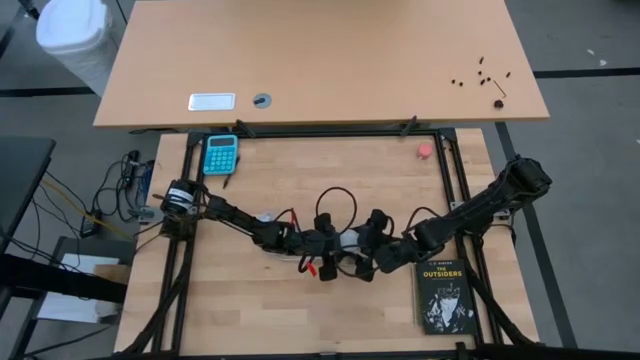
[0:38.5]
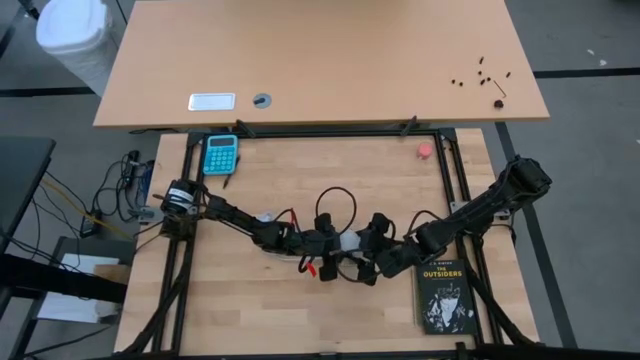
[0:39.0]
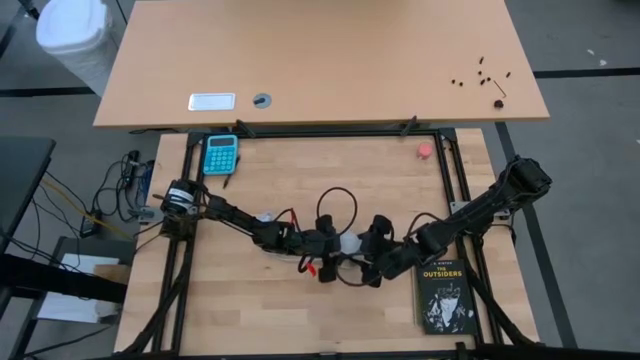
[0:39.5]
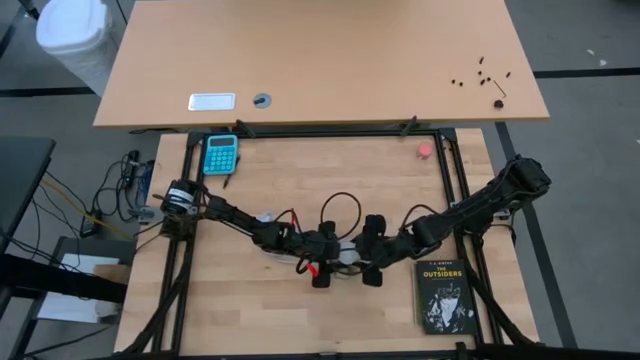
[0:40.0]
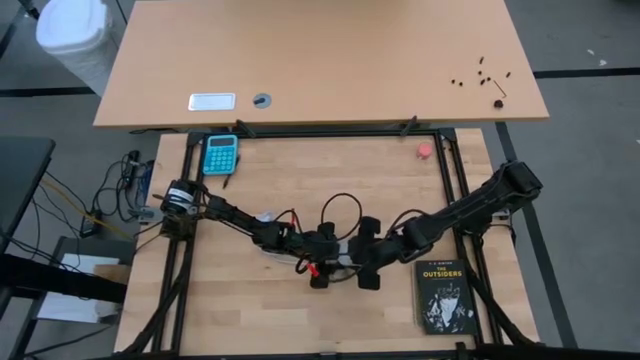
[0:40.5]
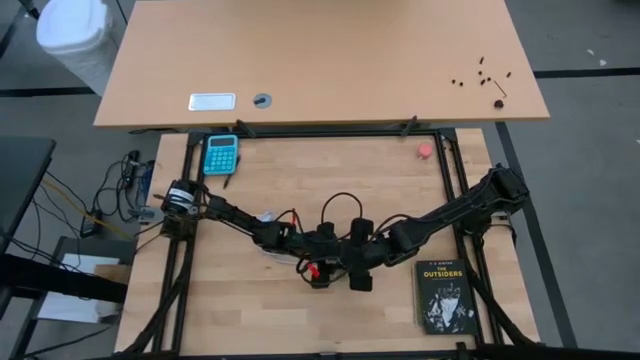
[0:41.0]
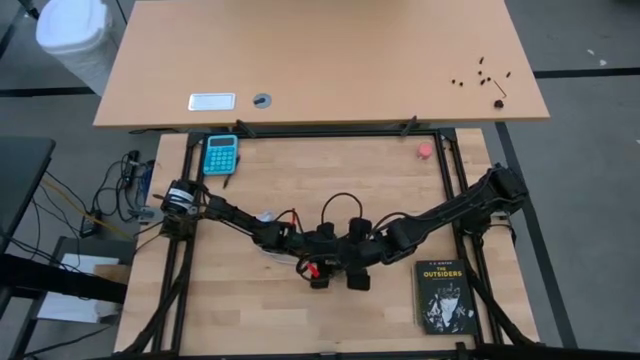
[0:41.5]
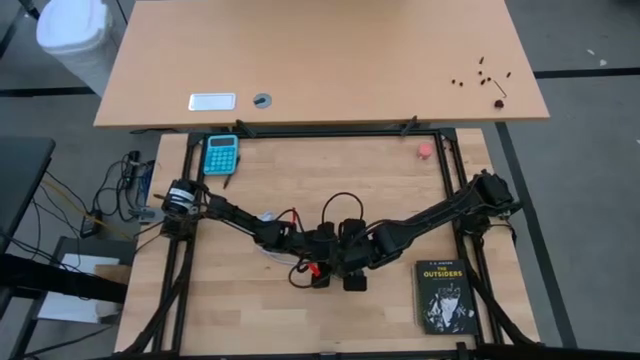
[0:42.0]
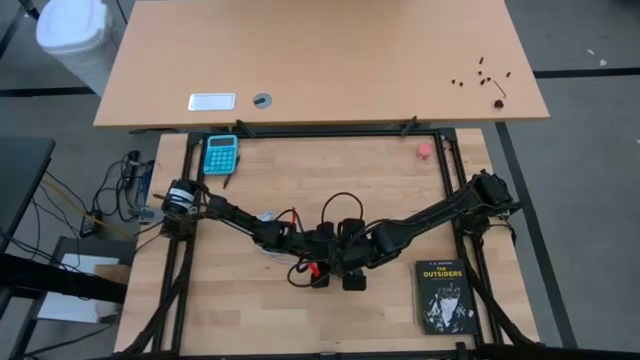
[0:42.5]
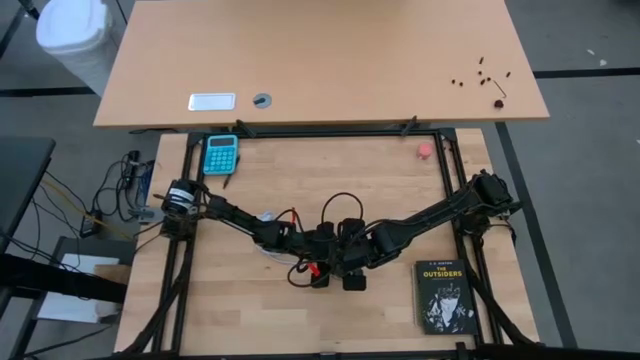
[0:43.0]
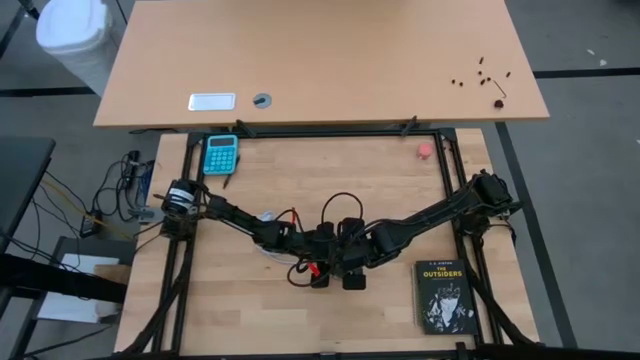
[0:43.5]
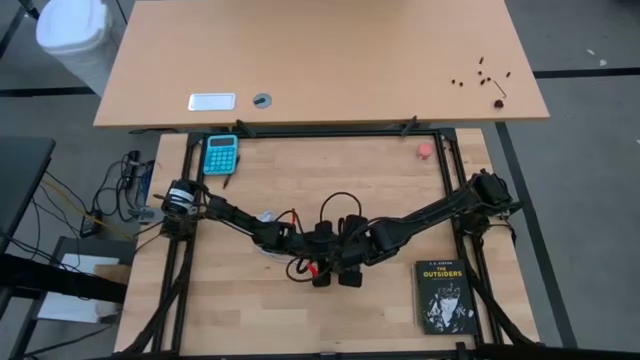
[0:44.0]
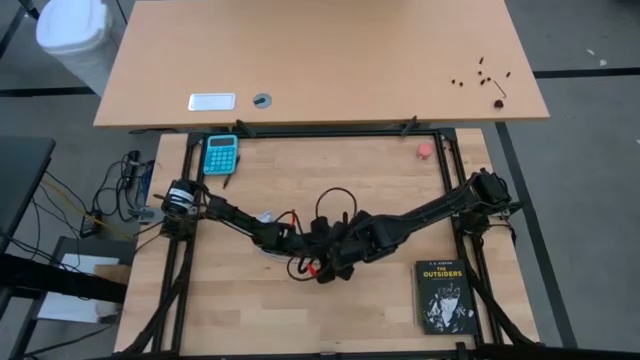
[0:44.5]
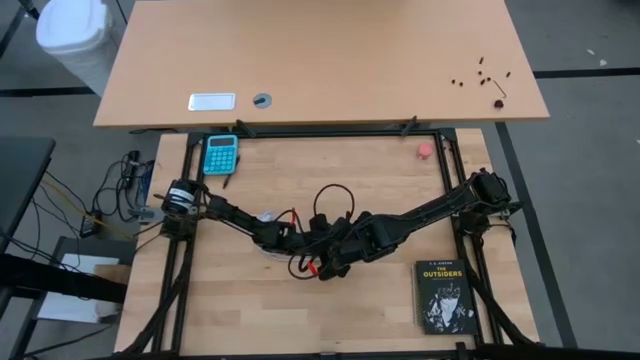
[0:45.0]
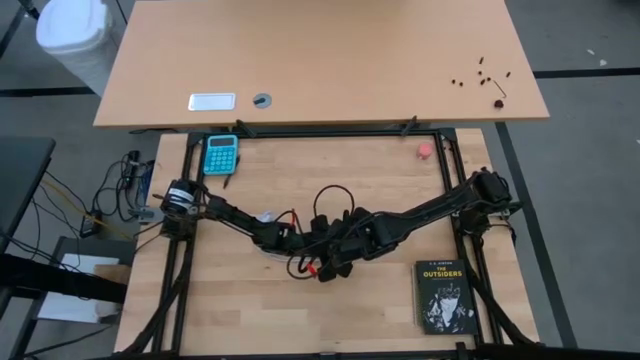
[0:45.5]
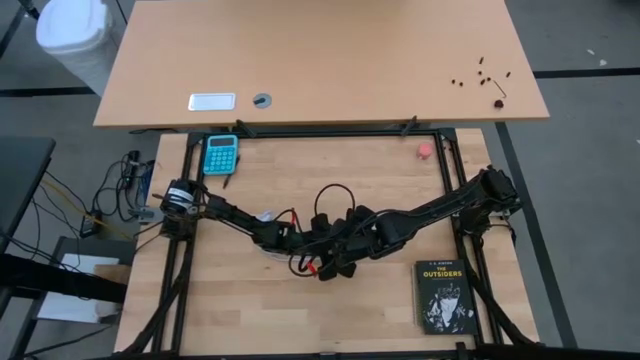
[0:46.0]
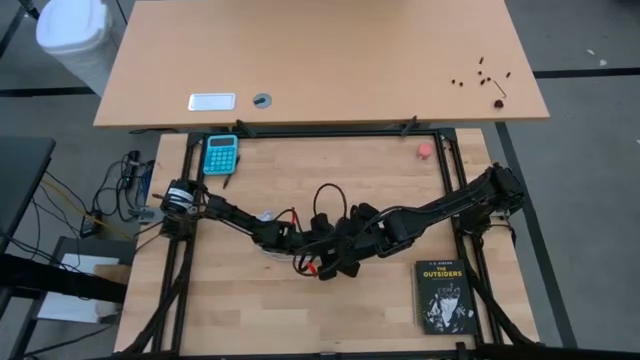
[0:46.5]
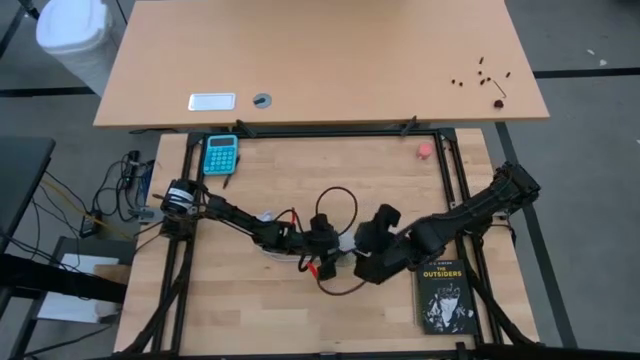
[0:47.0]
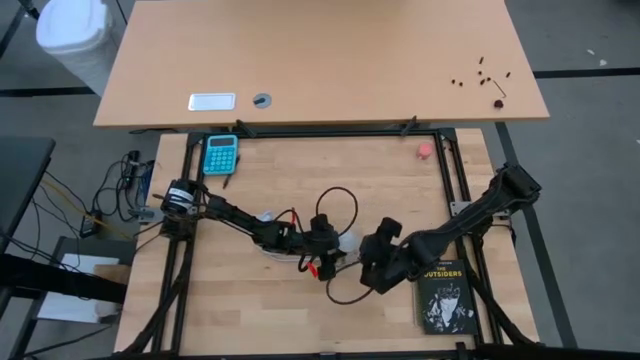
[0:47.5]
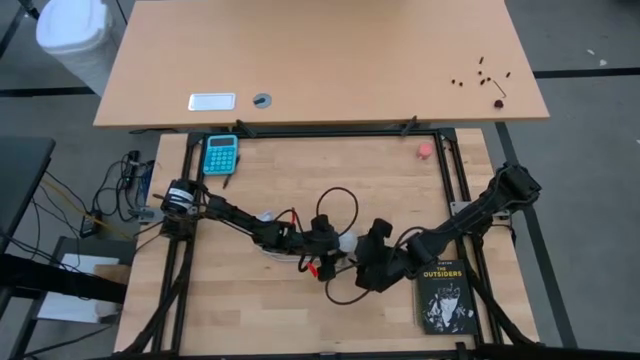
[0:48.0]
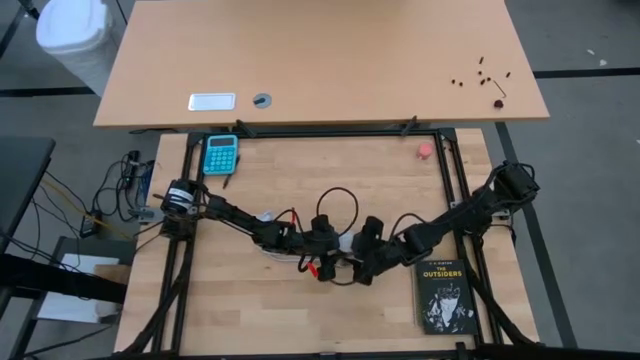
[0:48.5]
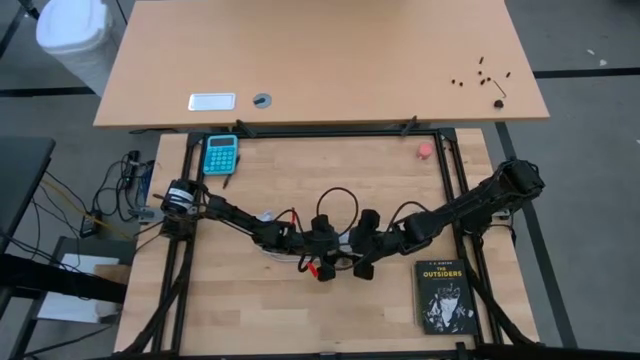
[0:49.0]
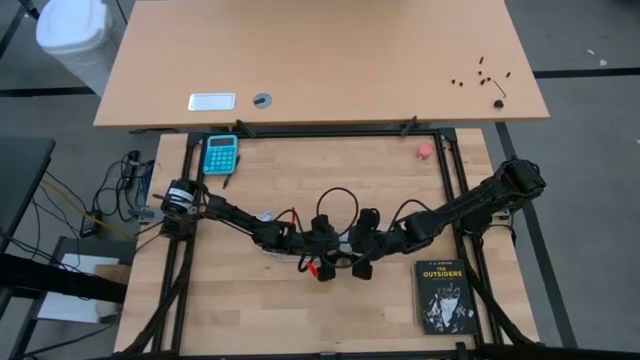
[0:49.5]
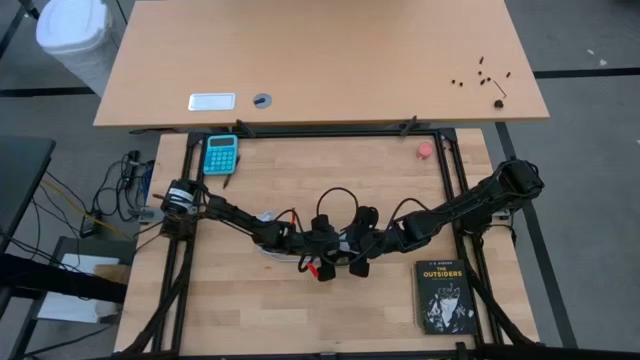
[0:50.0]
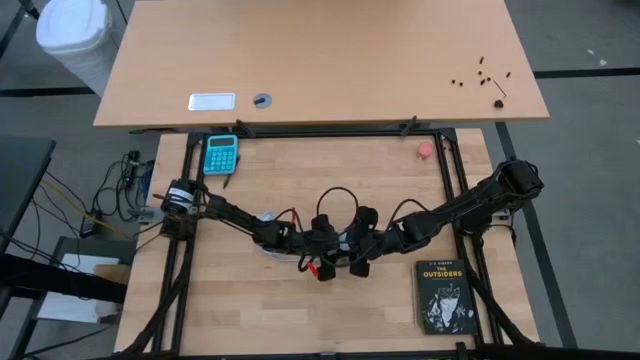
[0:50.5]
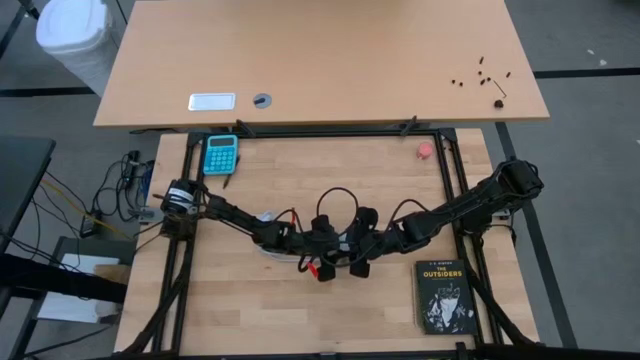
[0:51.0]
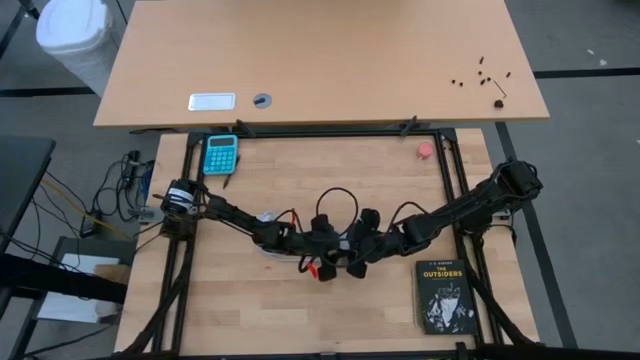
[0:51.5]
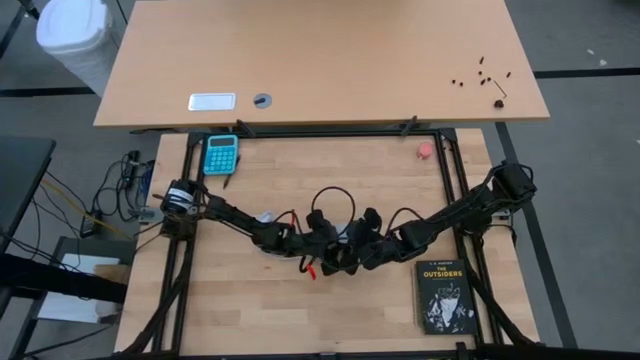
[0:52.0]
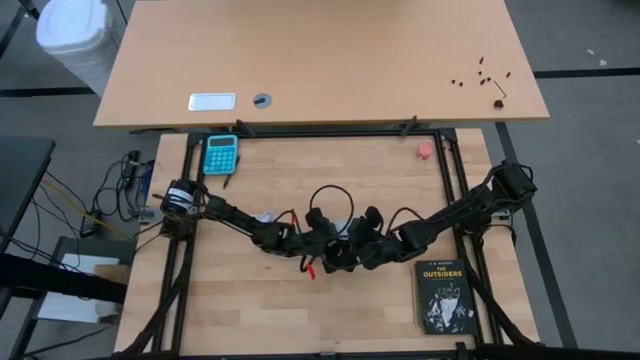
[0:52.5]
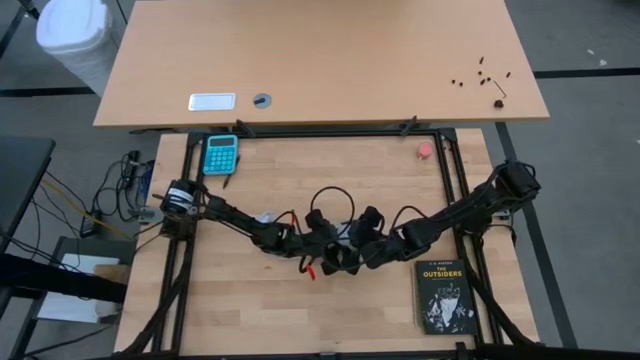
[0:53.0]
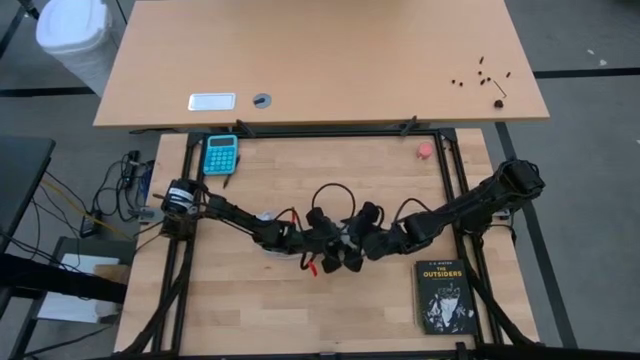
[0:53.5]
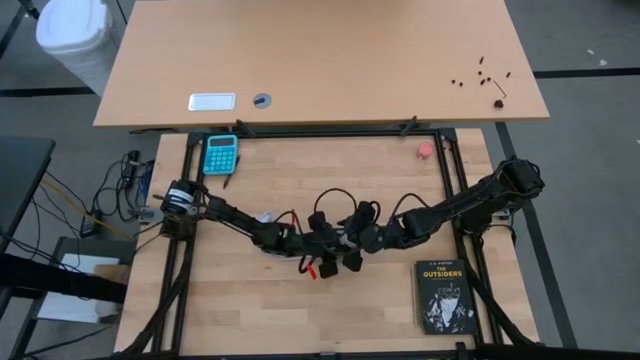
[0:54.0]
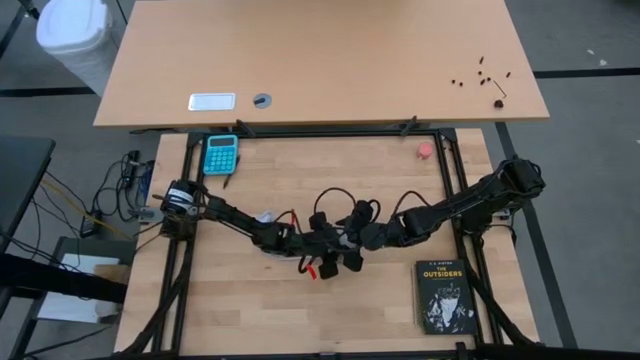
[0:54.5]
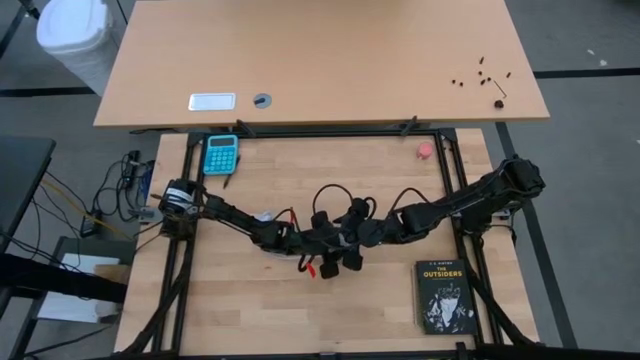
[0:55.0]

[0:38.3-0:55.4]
Task: Screw lightbulb
Insert the lightbulb into the lamp

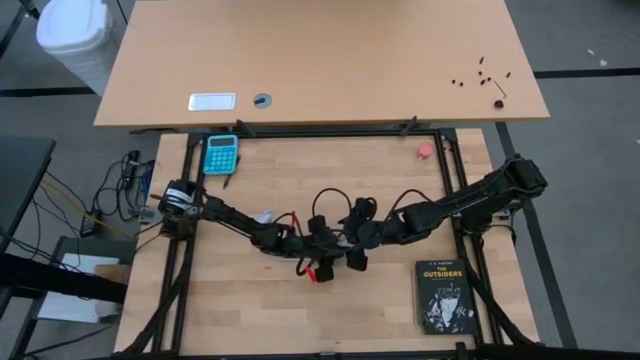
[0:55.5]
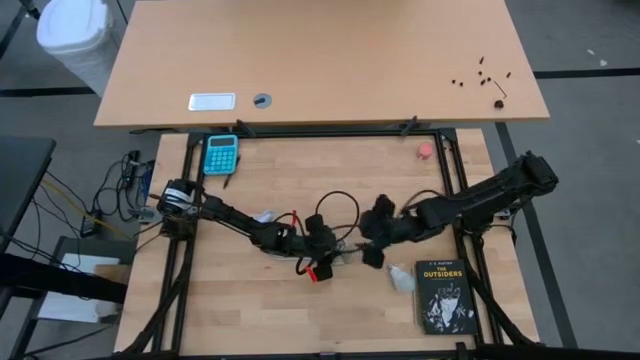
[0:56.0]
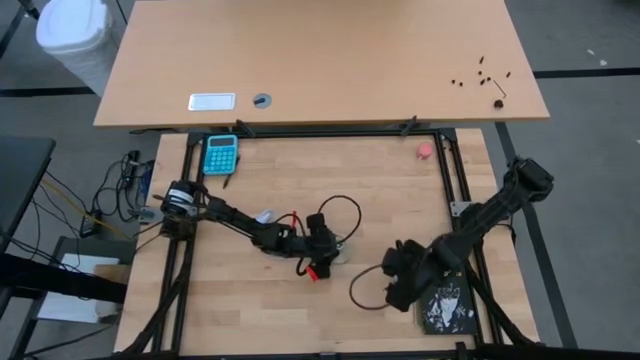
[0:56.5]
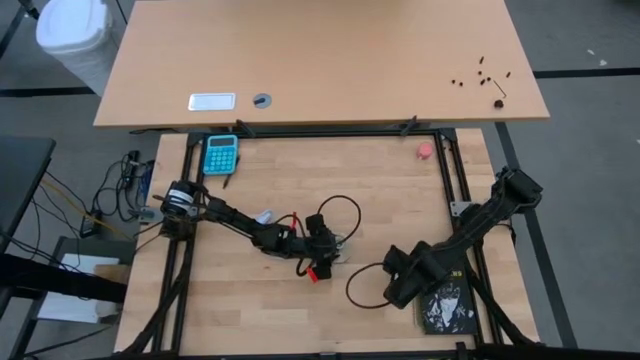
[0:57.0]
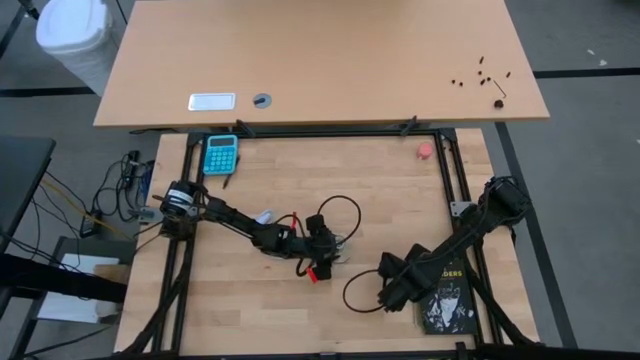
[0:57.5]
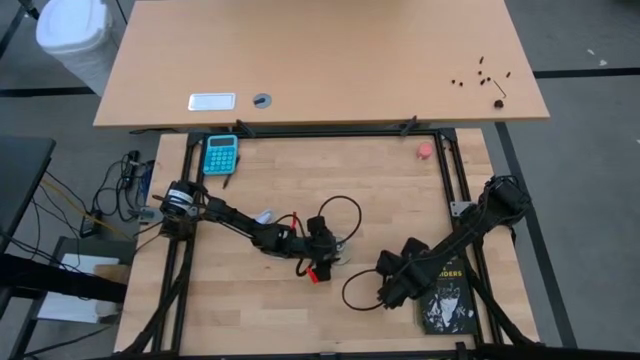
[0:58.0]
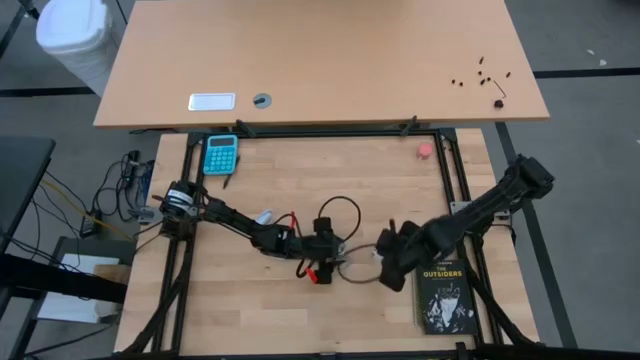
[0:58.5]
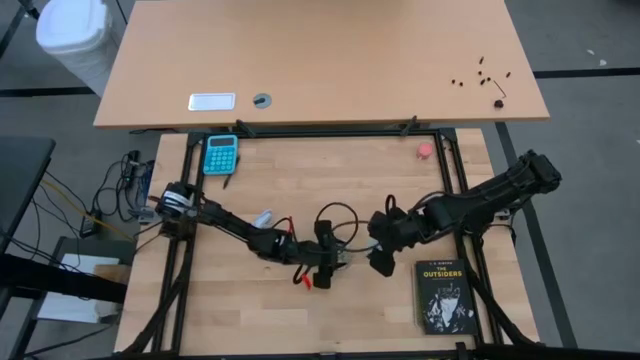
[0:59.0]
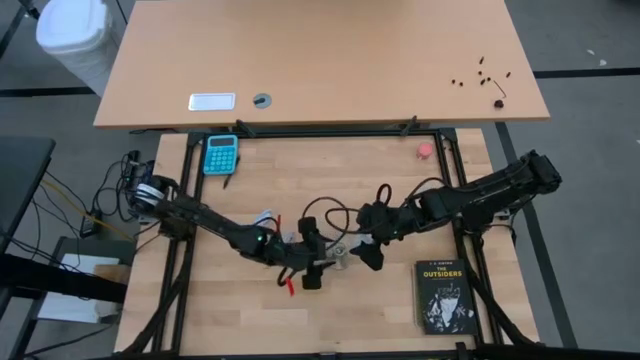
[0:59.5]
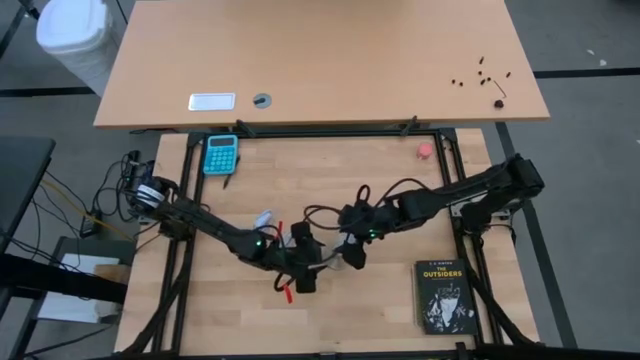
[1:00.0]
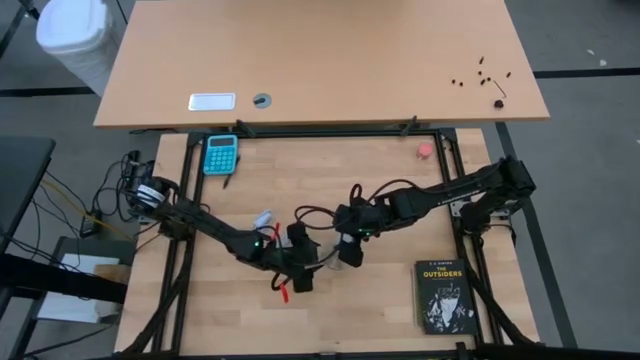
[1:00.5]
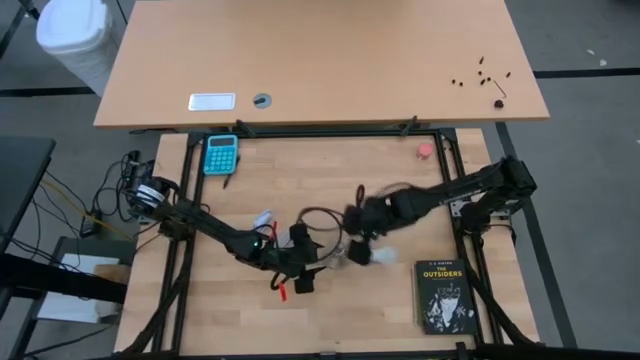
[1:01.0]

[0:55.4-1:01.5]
Insert the lightbulb into the lamp
